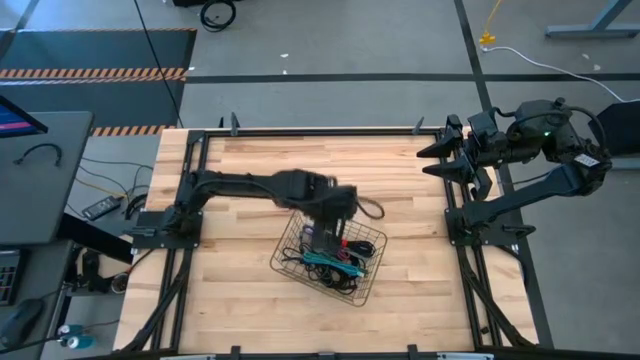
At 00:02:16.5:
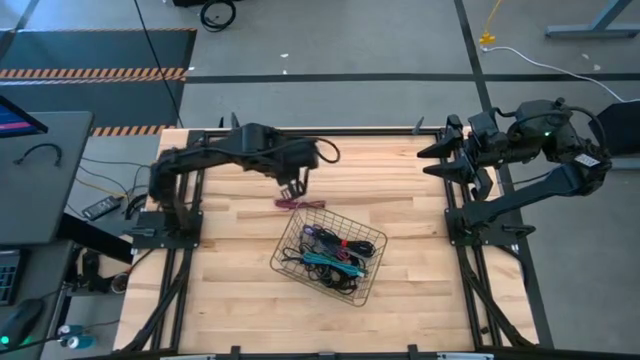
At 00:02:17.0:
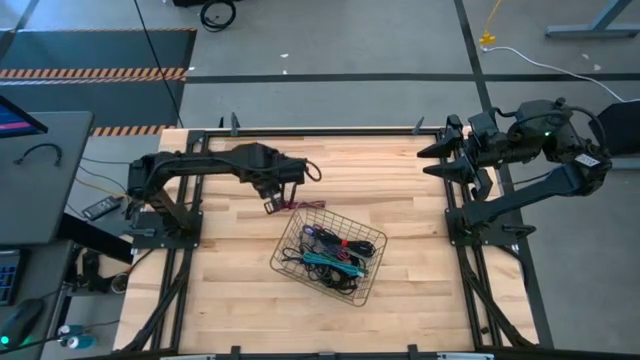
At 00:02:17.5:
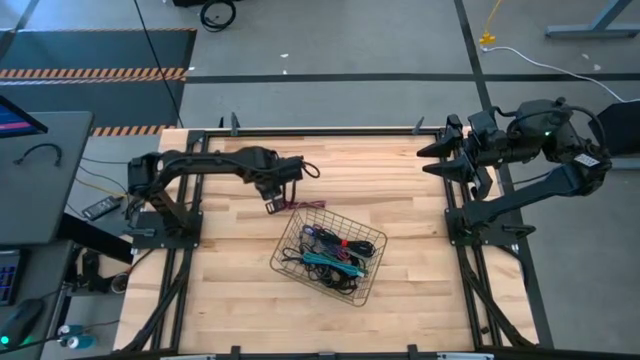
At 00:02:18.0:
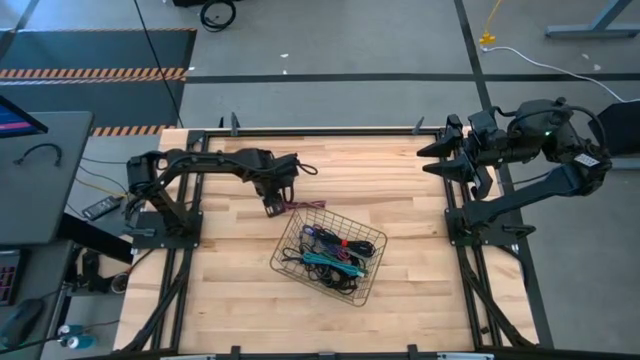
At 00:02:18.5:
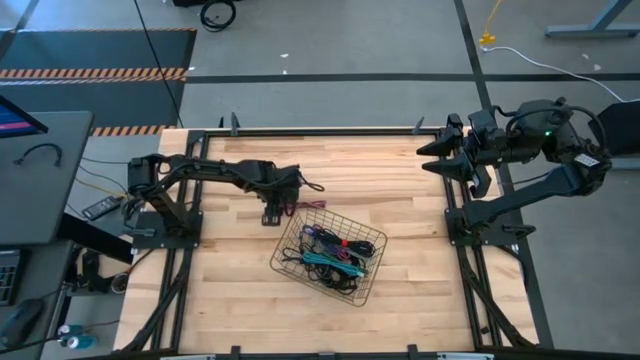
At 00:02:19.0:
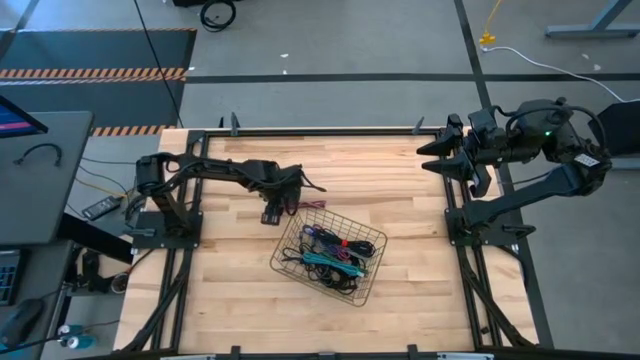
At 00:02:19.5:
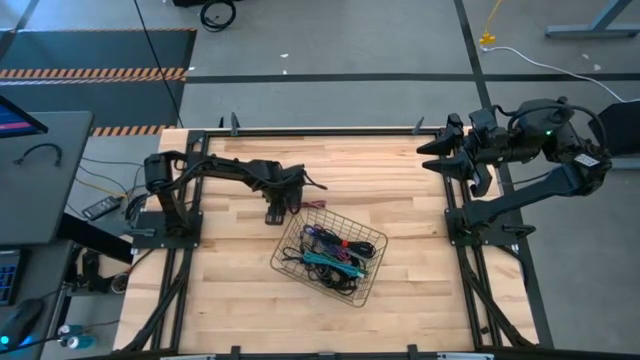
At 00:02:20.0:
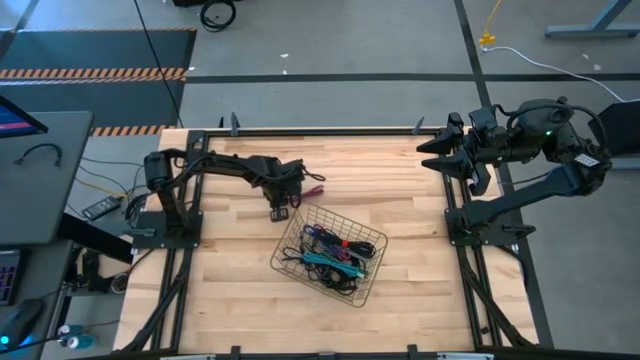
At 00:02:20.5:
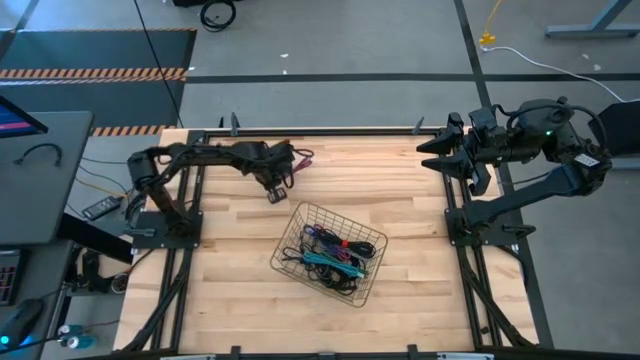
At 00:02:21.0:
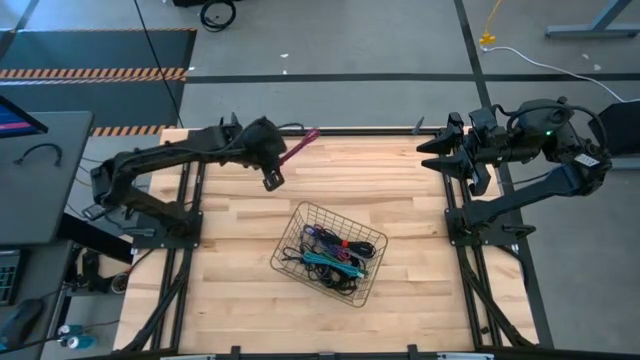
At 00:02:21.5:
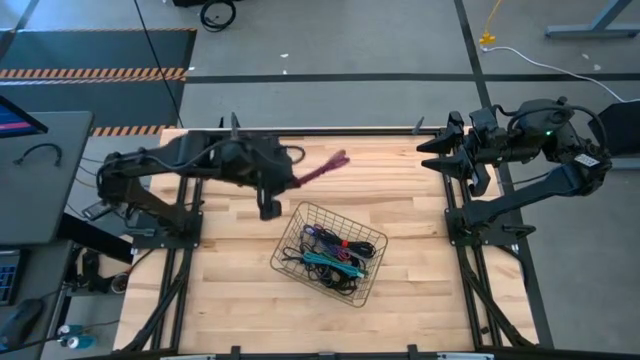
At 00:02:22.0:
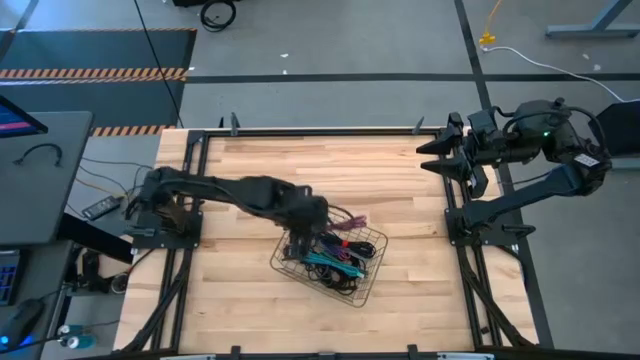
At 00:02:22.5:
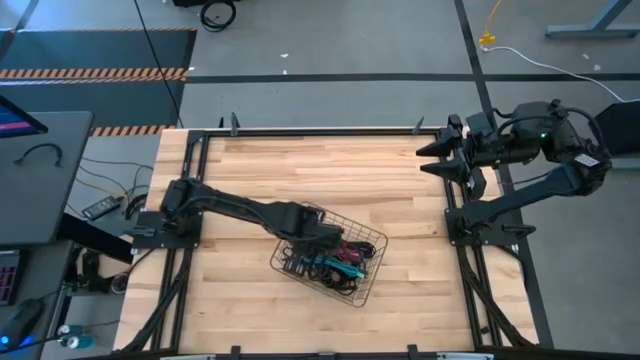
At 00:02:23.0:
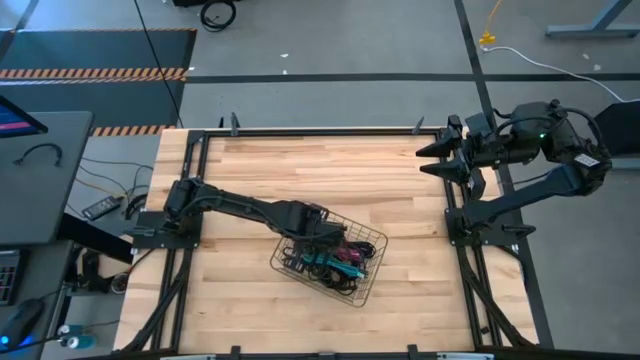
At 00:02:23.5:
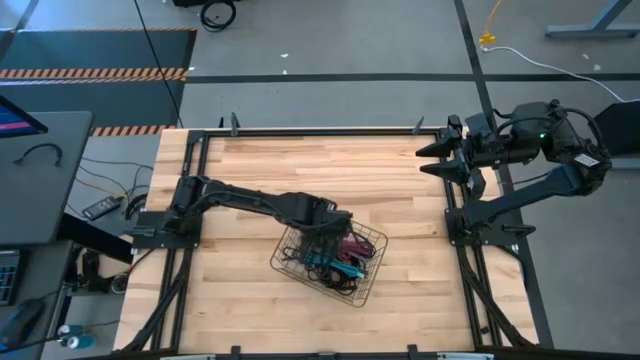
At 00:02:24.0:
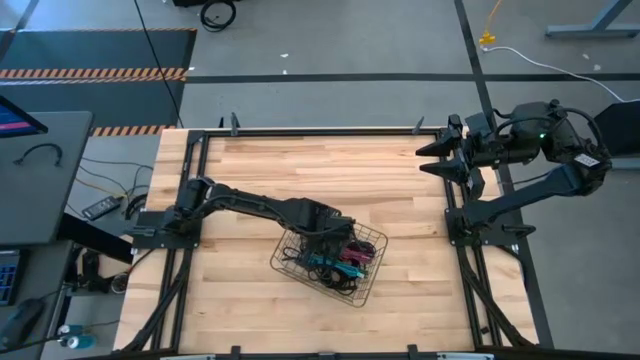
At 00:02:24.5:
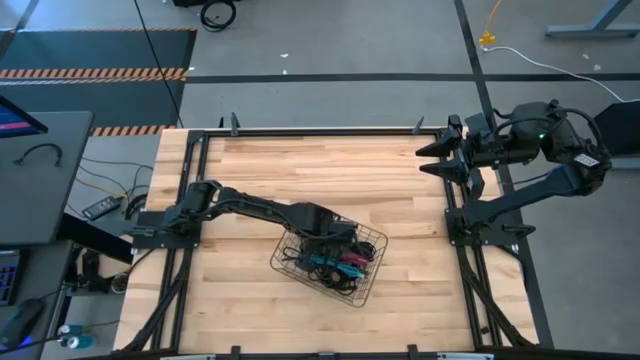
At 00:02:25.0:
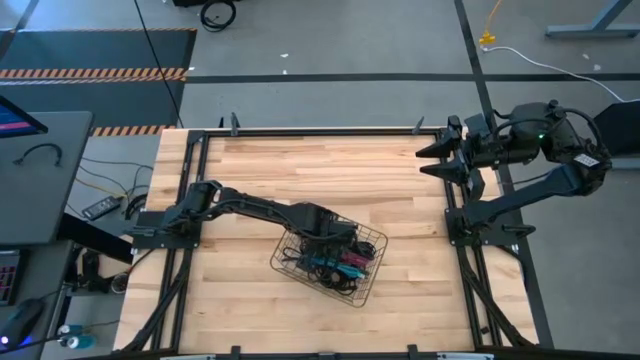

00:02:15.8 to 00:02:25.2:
Task: Pick and place USB-C Cables
Put the pink charger cable into the wire basket

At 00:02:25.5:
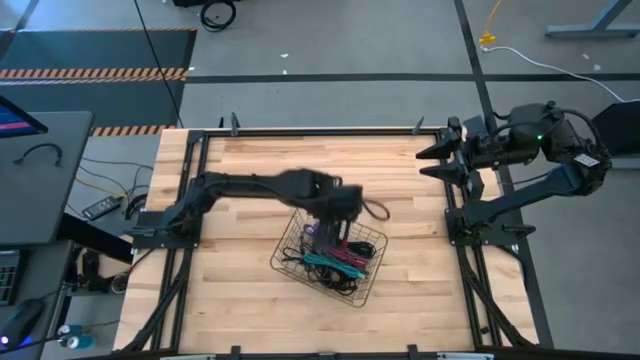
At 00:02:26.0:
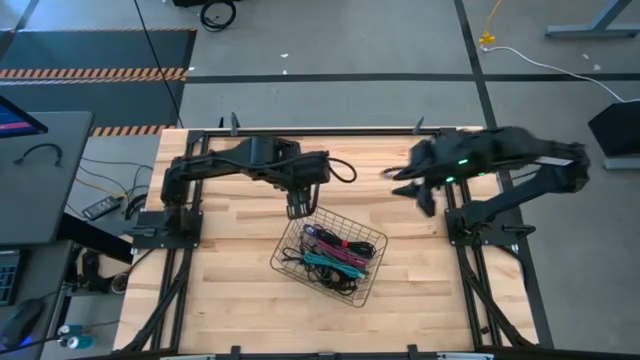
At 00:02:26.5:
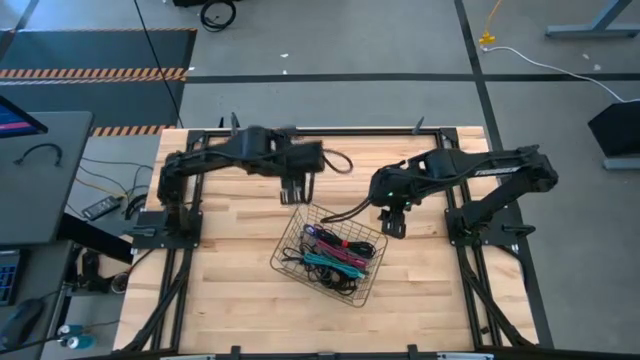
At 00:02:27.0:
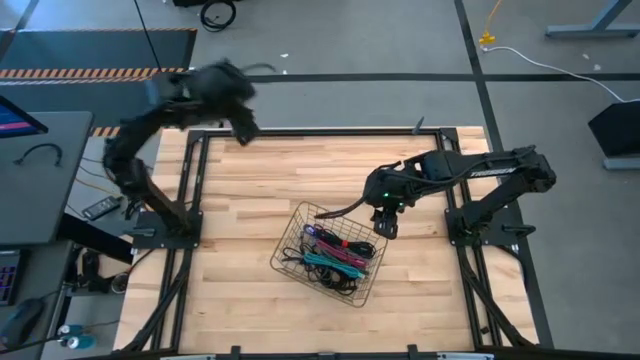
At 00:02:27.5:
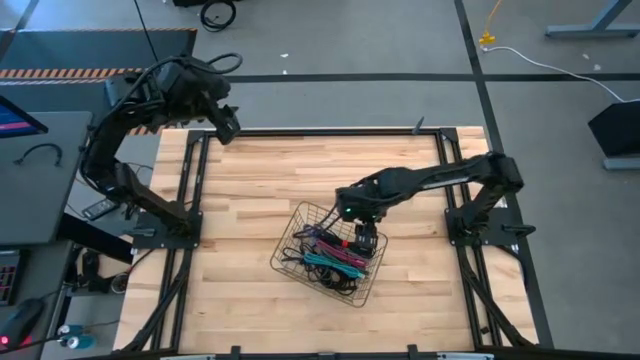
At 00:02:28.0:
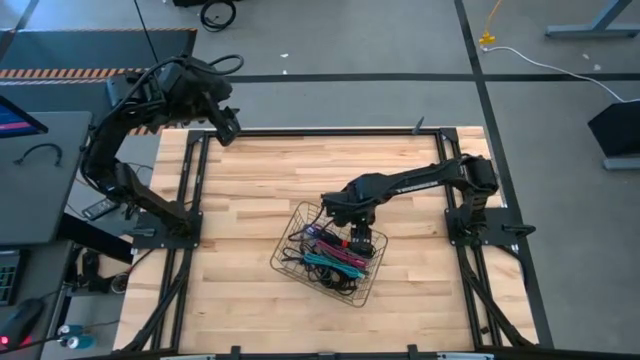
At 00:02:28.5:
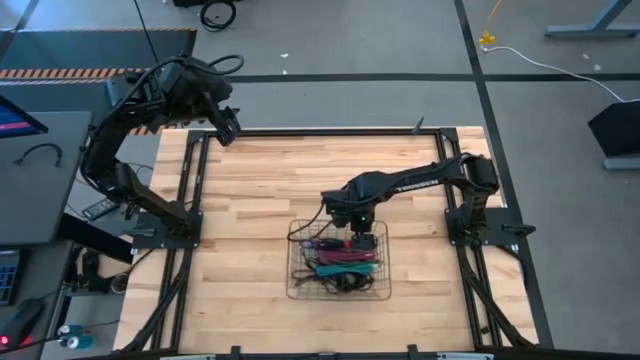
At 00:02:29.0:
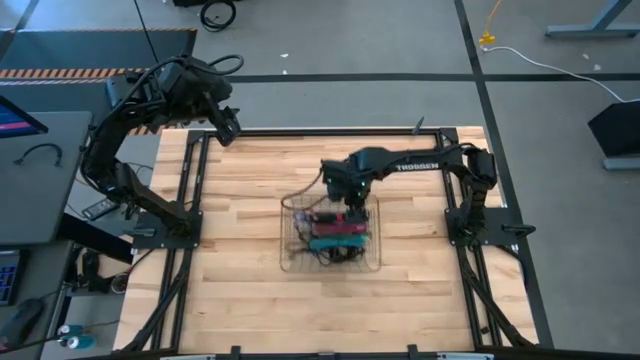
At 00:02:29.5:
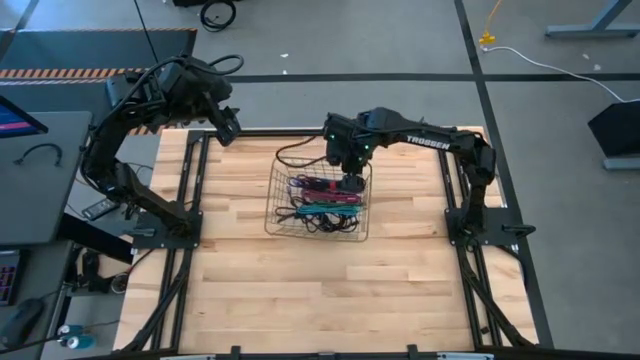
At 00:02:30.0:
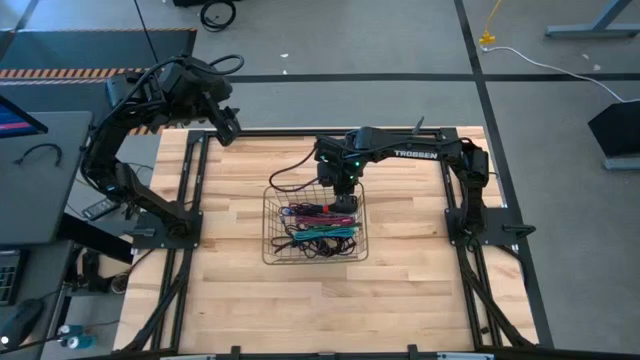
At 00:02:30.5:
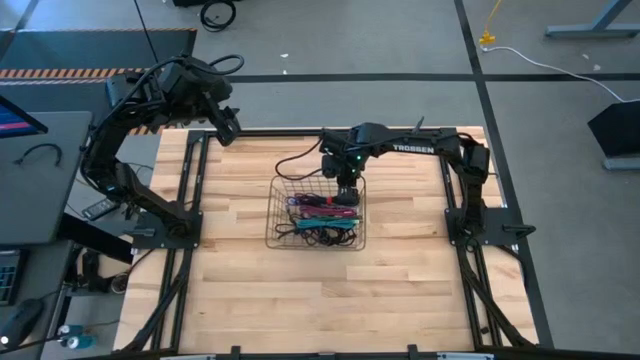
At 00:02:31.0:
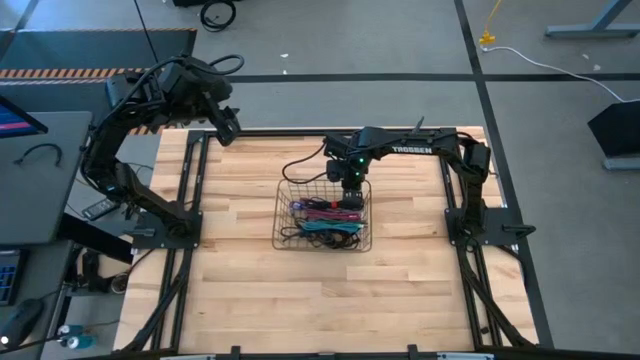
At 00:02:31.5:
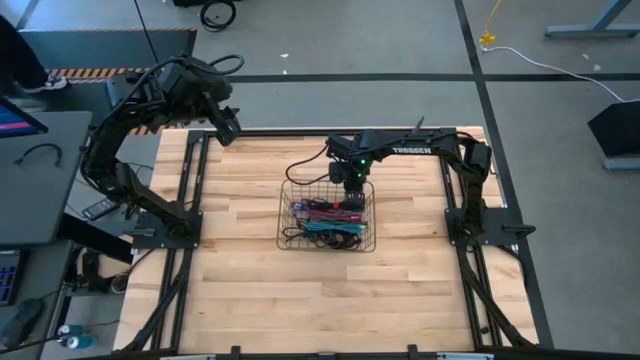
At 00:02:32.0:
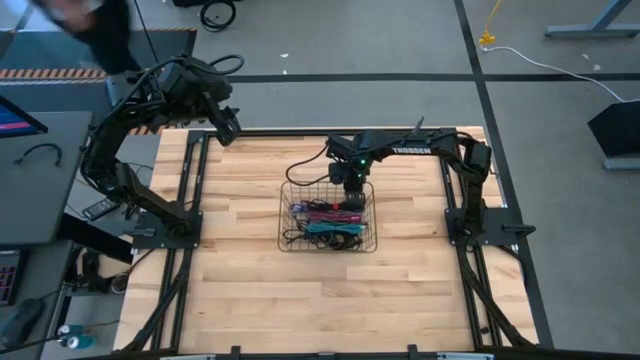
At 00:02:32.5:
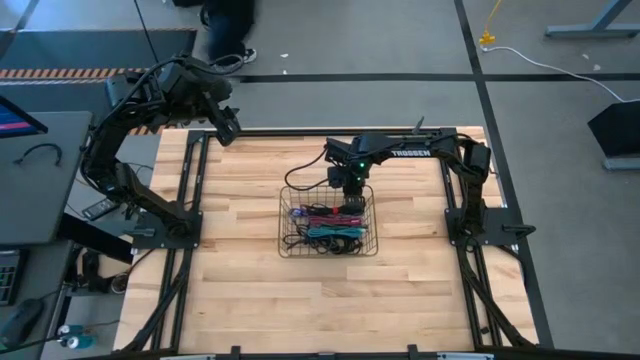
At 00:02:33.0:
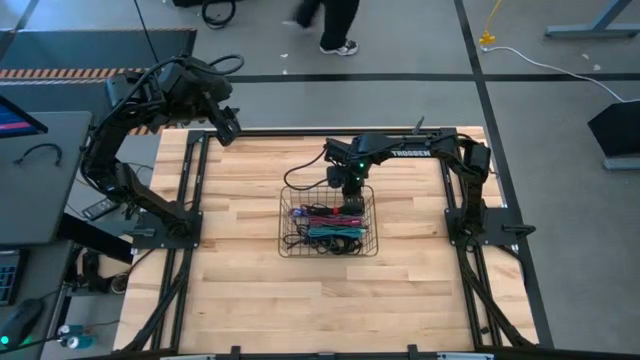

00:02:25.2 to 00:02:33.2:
Adjust the wire basket
